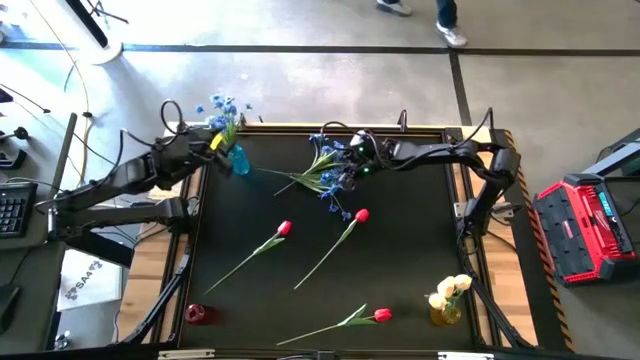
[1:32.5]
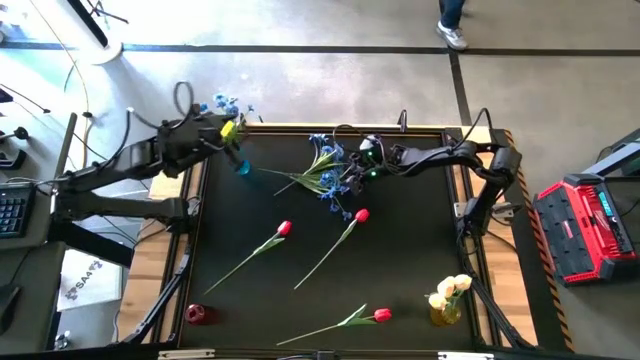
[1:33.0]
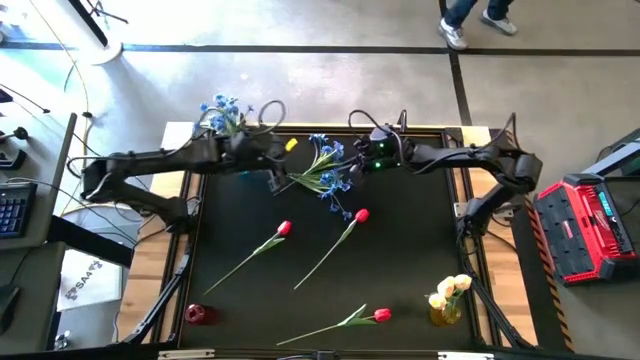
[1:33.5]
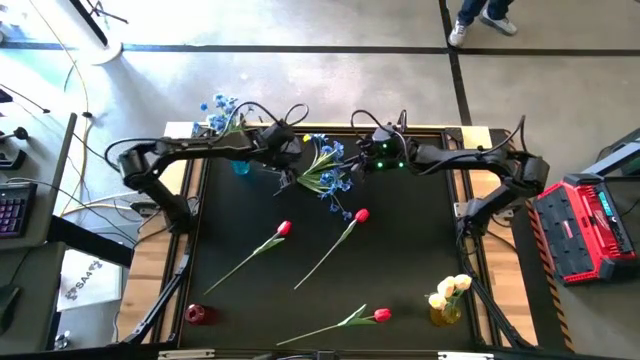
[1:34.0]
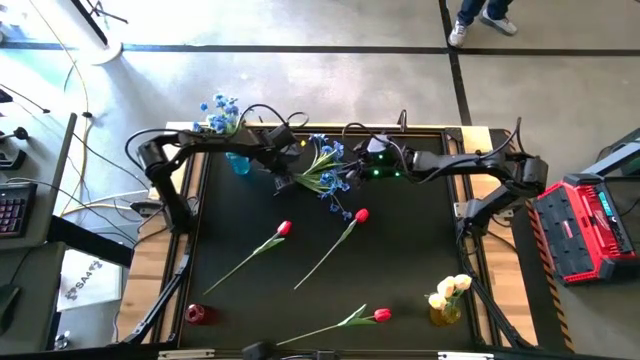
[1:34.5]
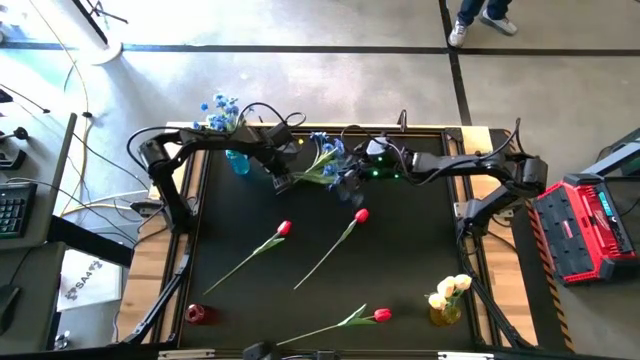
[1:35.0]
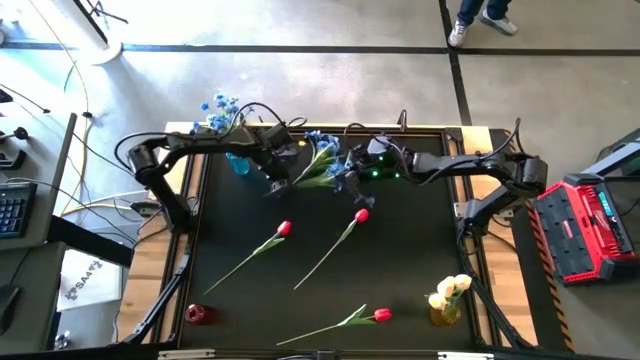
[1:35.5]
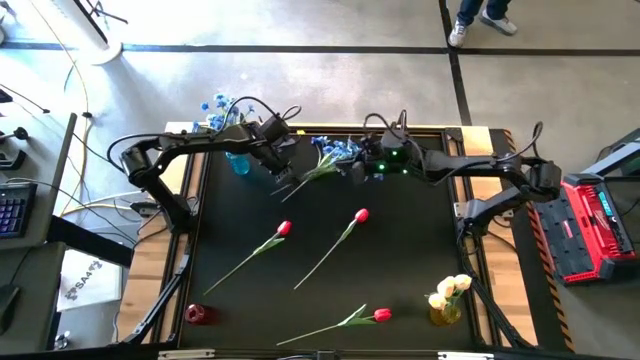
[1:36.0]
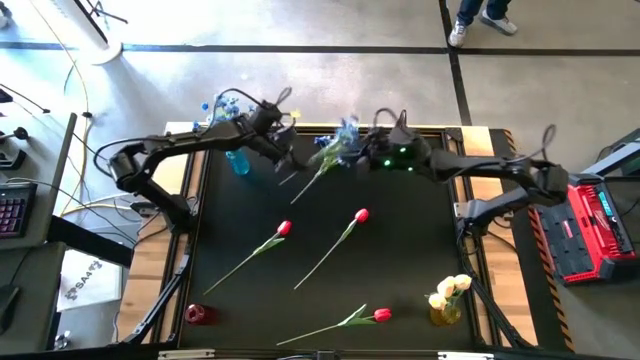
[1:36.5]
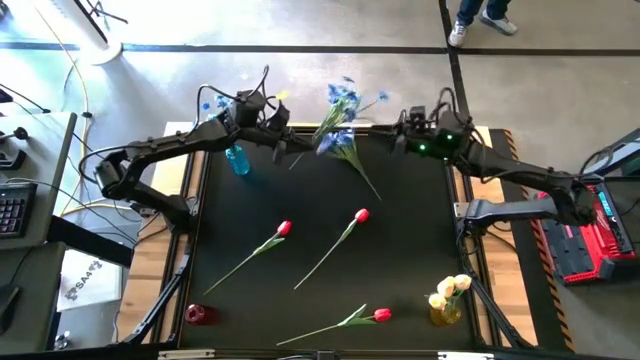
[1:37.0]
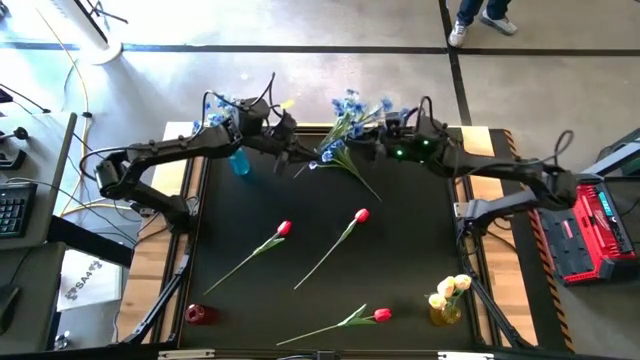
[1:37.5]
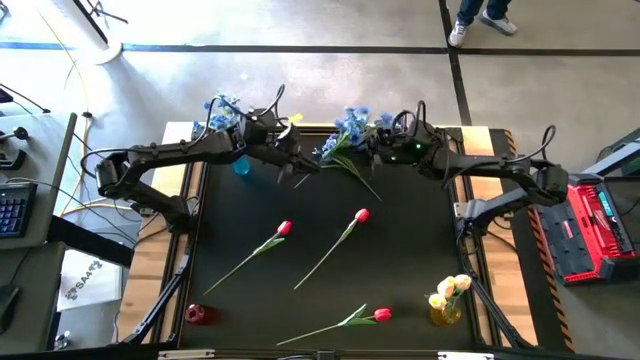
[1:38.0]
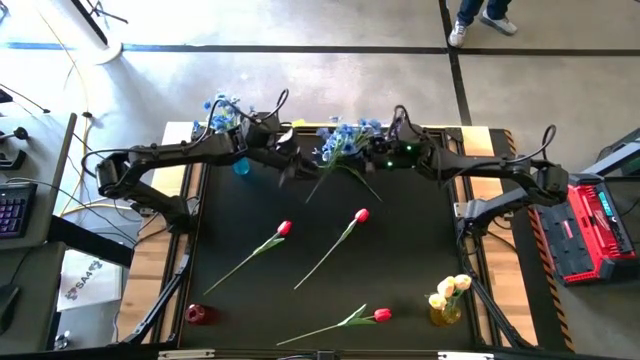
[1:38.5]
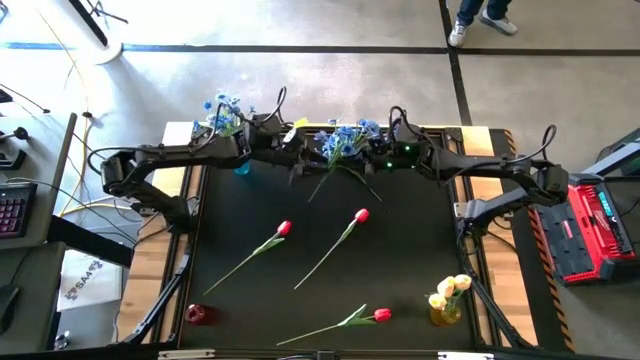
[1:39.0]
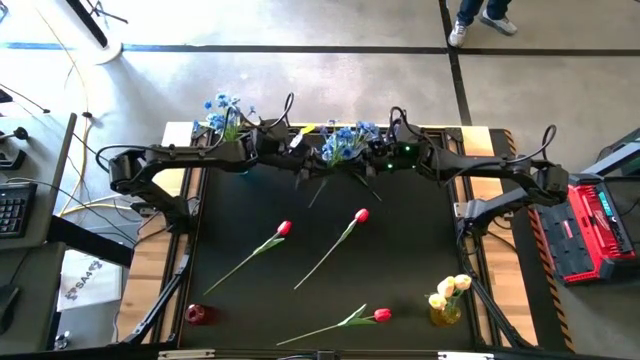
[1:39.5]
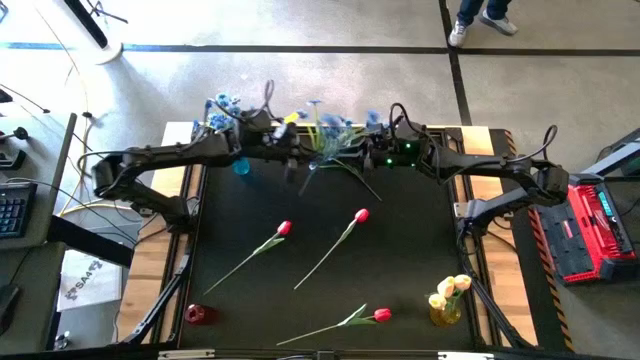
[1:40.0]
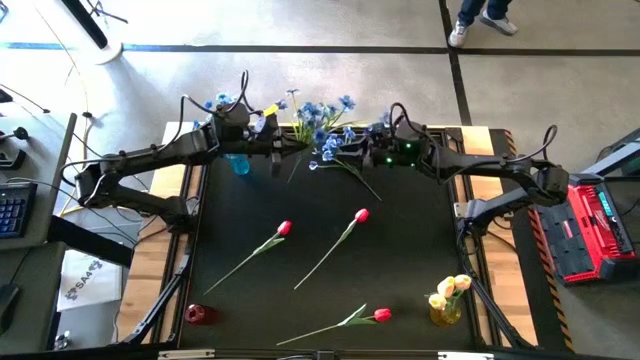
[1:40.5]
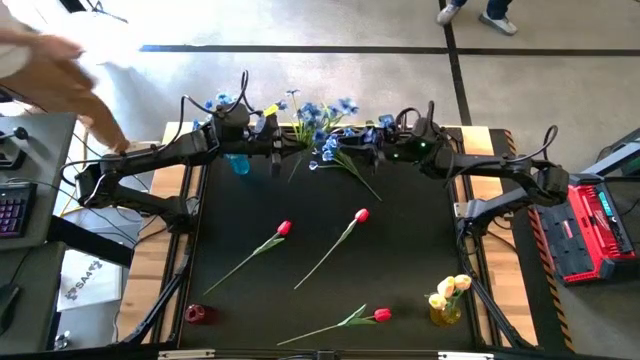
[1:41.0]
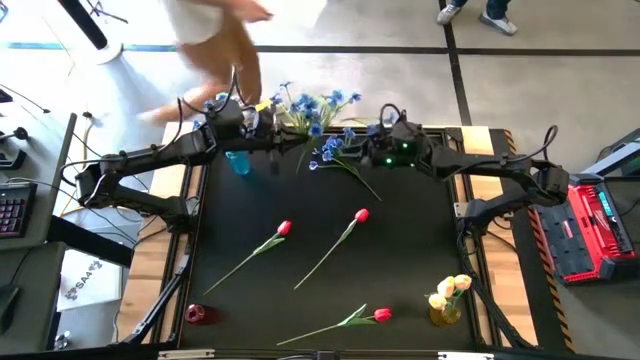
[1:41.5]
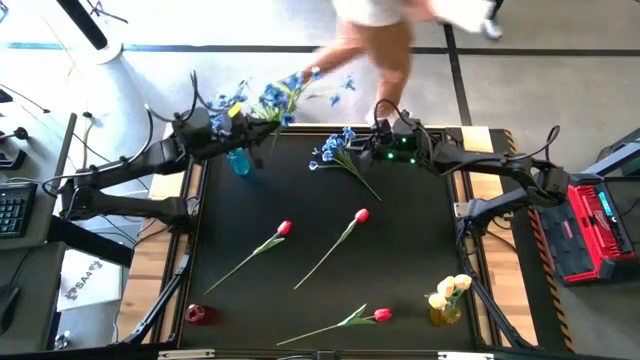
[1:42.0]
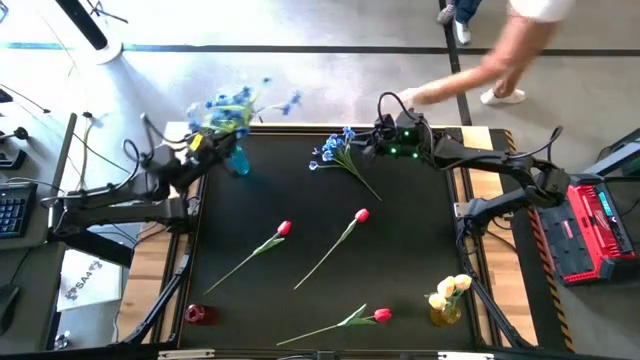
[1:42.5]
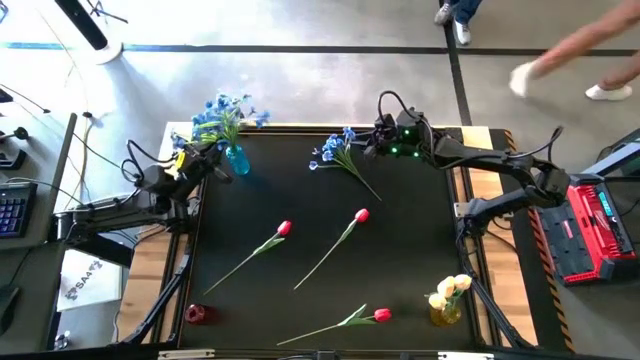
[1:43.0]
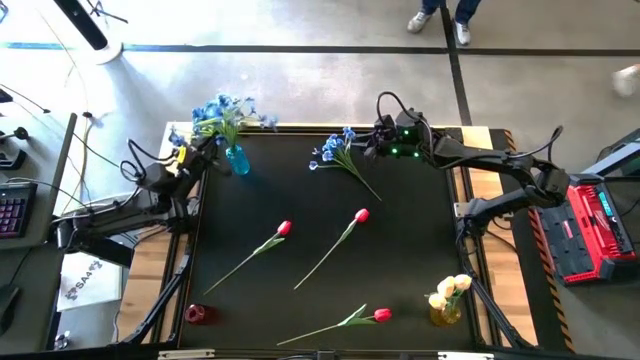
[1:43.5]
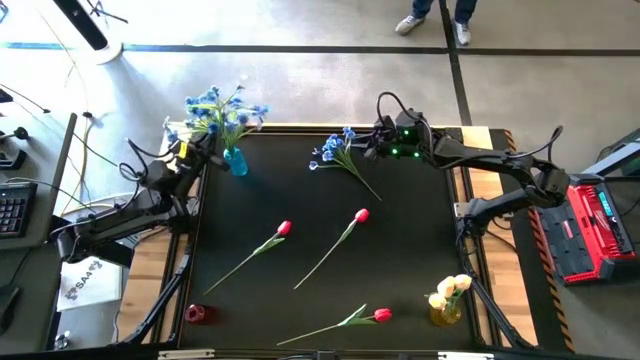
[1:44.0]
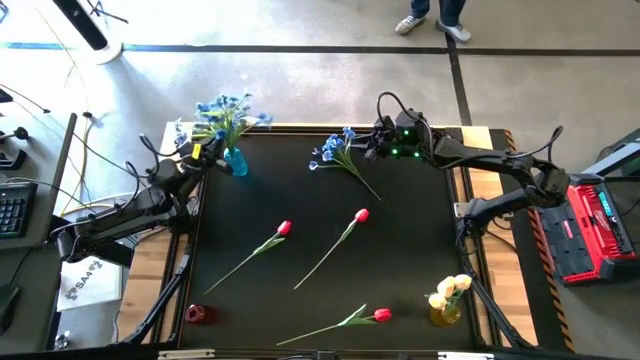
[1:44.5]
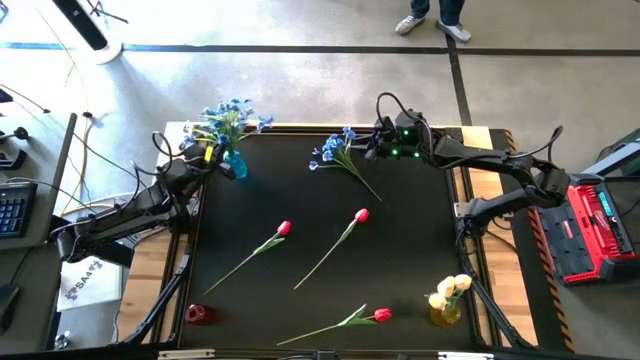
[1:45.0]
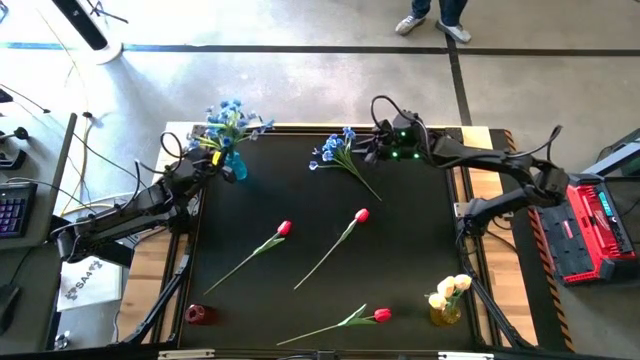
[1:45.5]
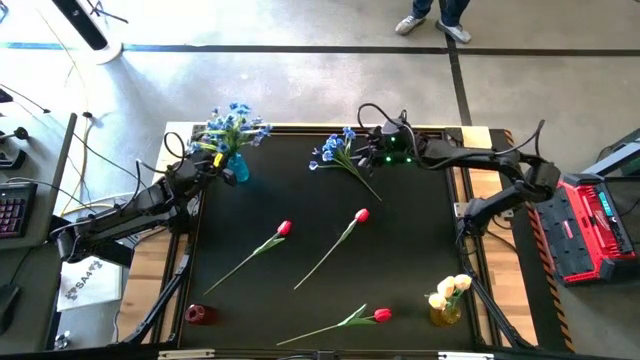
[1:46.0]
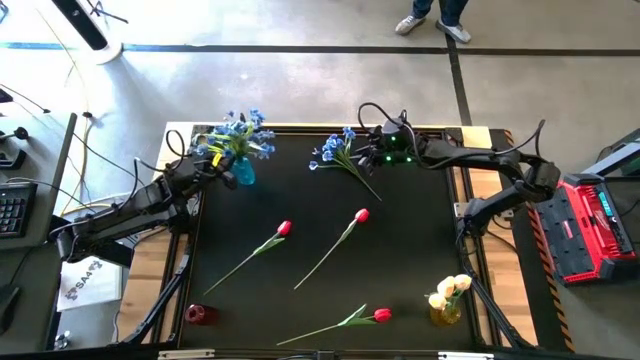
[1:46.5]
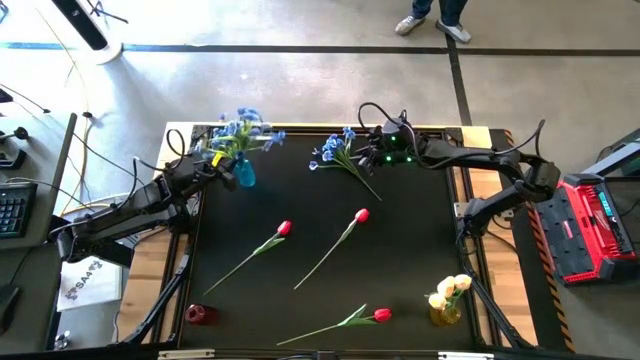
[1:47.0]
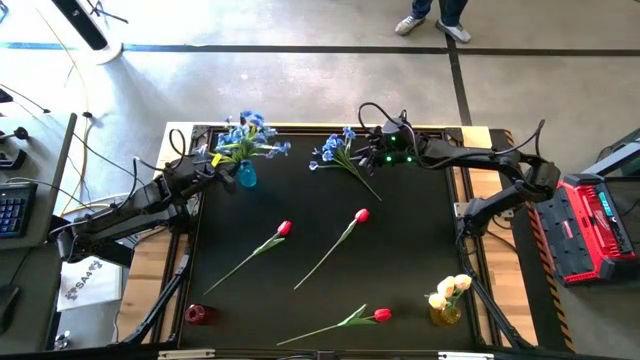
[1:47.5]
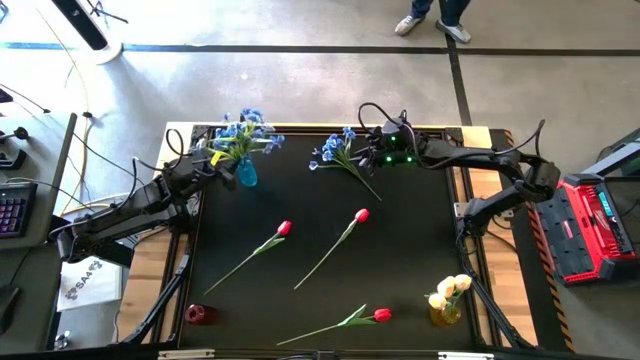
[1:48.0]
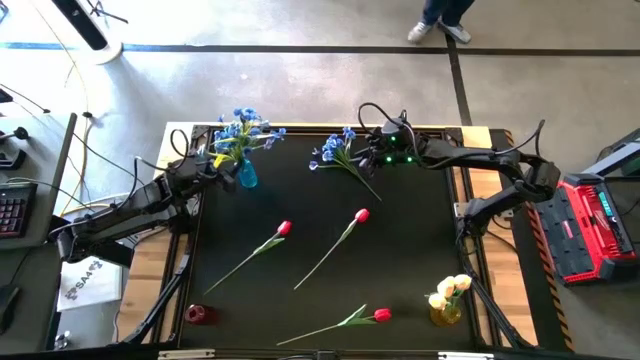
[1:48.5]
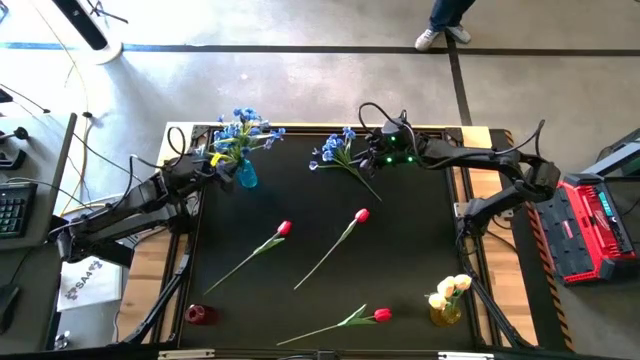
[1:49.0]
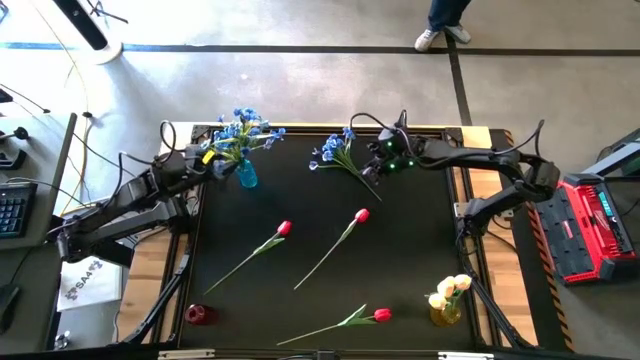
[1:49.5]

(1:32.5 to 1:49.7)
Task: Sort flowers into vase by color
Put the bottom blue flowers into the blue vase

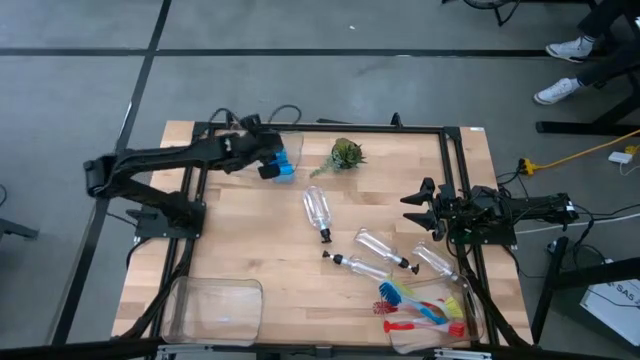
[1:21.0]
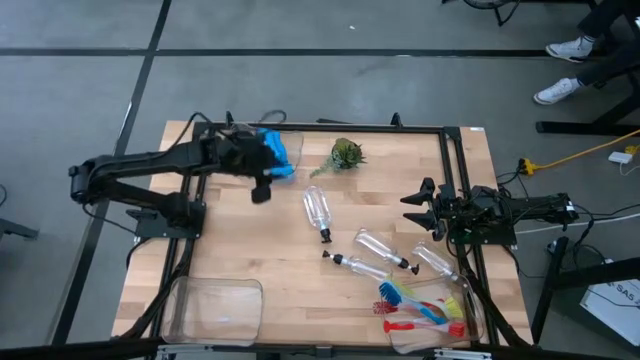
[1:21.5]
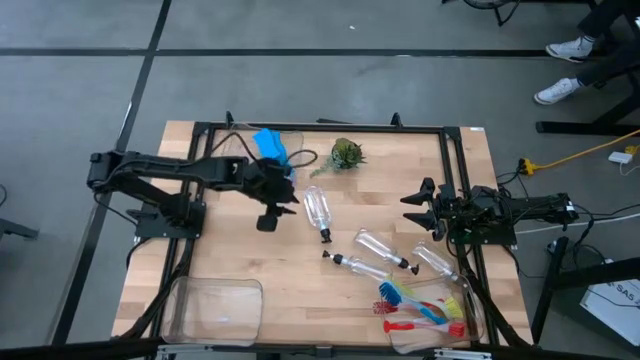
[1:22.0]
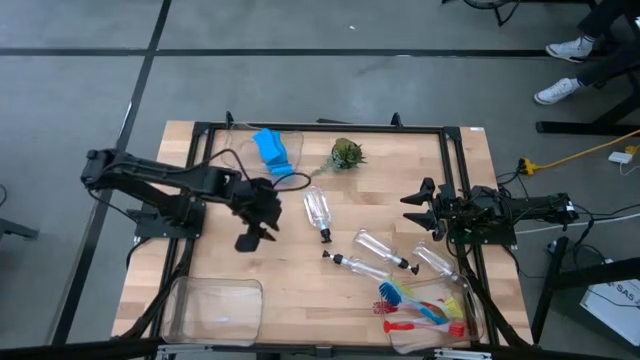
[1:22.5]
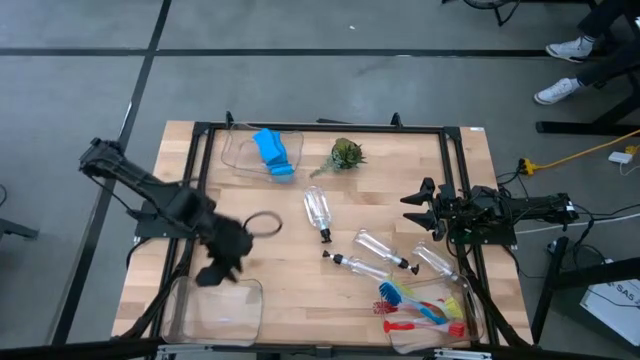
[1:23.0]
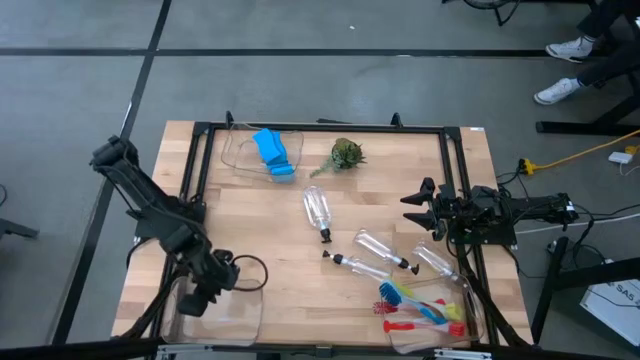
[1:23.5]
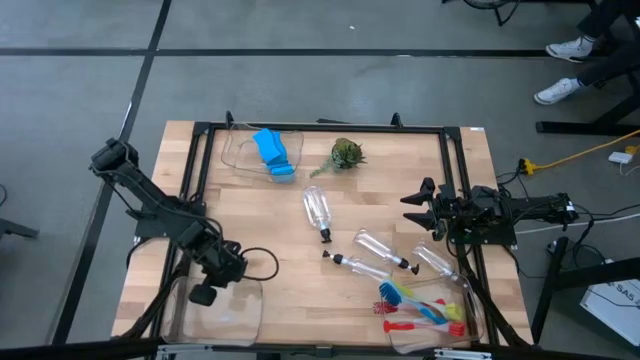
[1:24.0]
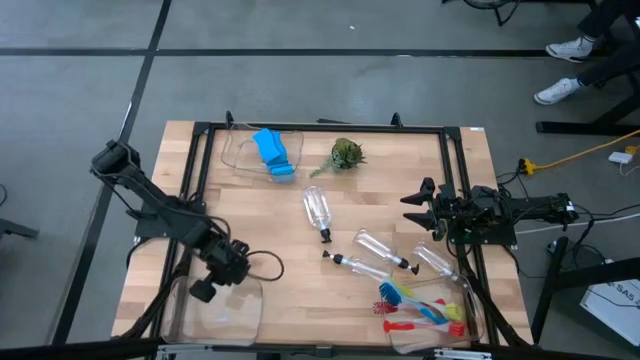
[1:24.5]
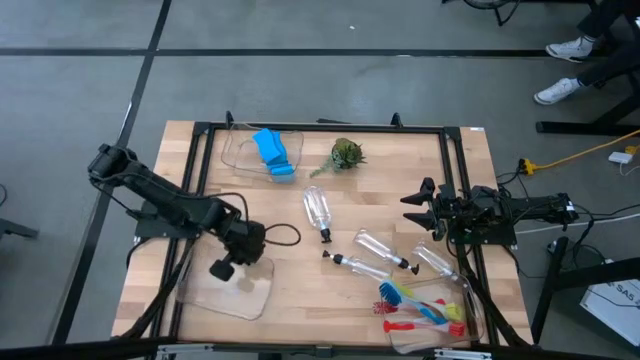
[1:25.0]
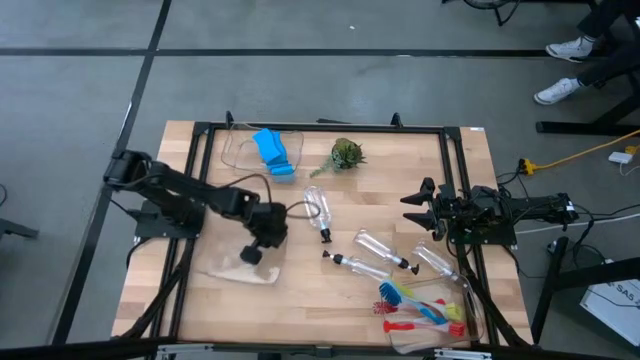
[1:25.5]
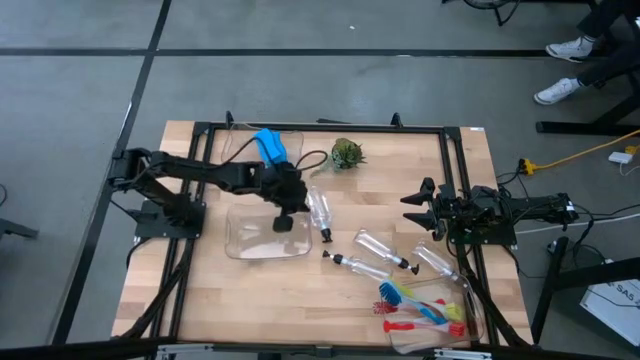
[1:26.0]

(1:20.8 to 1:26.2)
Task: Pick & Place Kitchen Sink Supplies
Move the bottom left transparent bin to the middle left of the table
